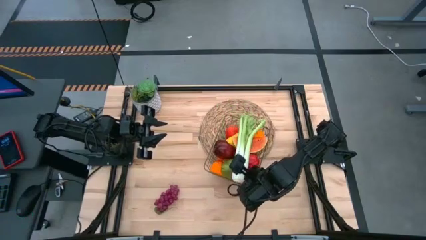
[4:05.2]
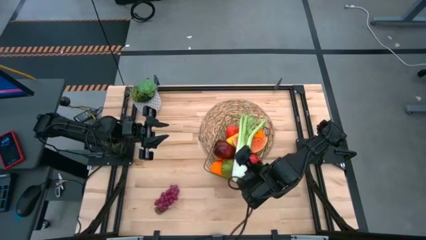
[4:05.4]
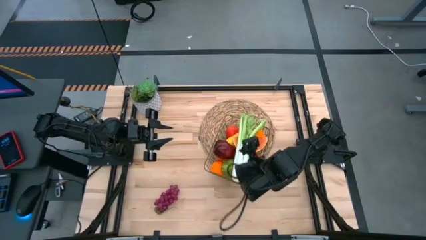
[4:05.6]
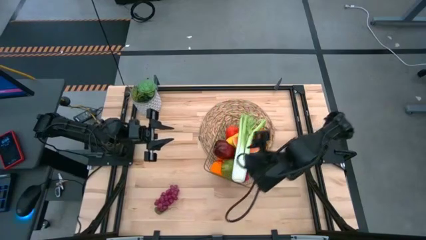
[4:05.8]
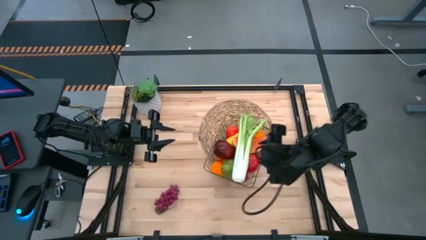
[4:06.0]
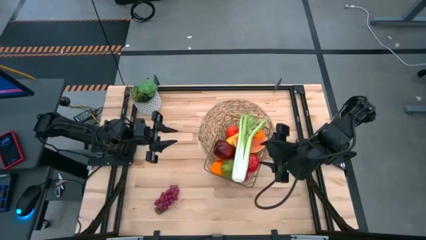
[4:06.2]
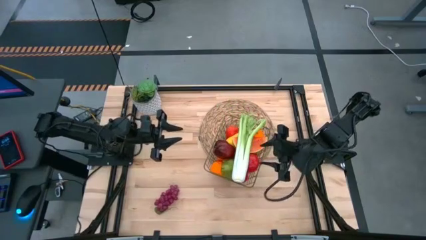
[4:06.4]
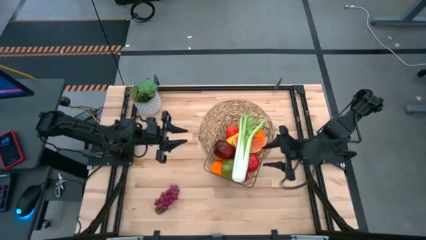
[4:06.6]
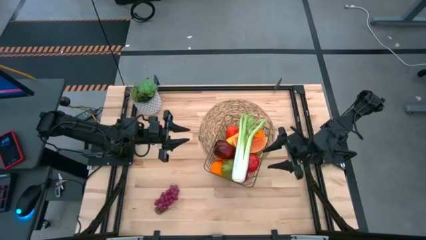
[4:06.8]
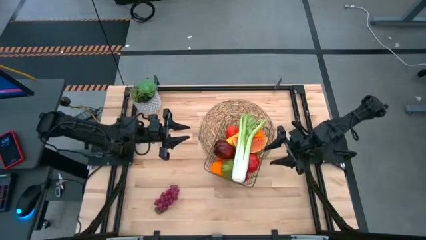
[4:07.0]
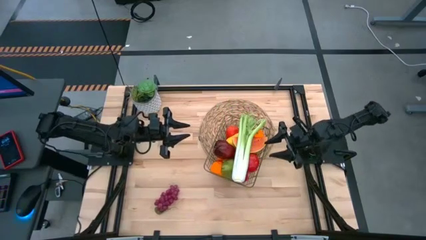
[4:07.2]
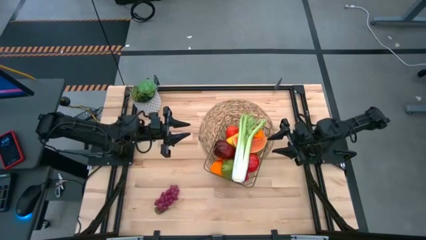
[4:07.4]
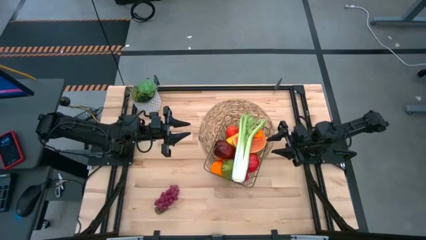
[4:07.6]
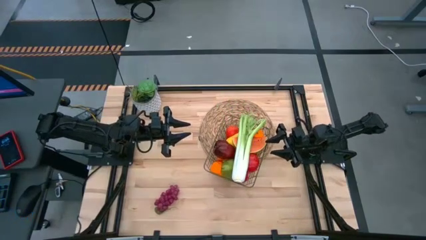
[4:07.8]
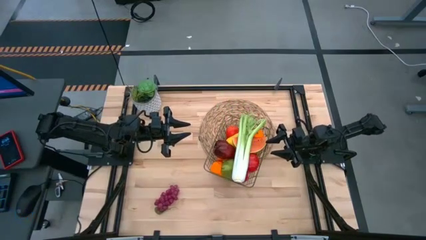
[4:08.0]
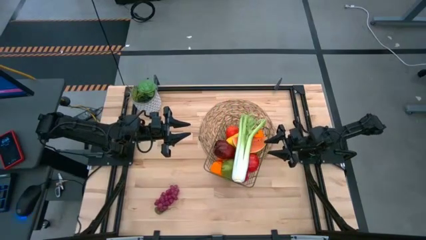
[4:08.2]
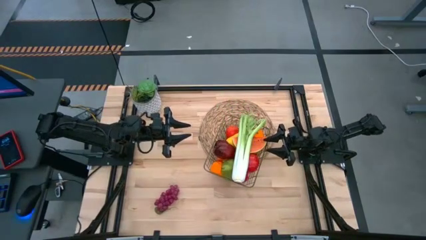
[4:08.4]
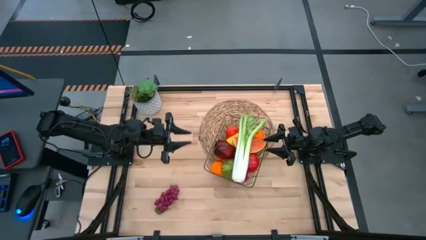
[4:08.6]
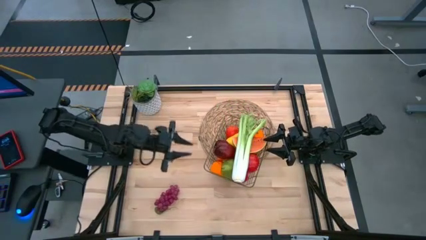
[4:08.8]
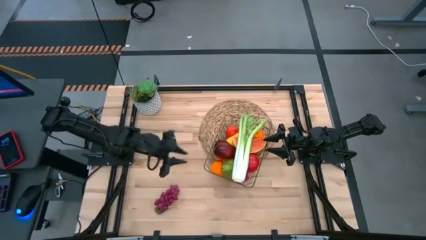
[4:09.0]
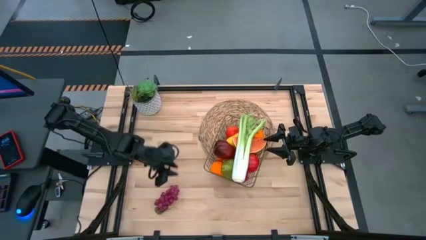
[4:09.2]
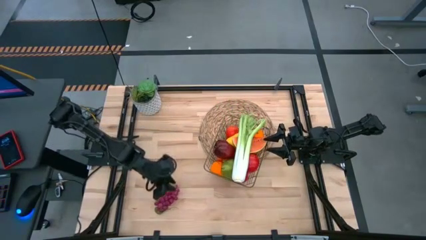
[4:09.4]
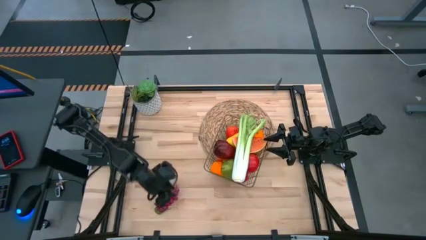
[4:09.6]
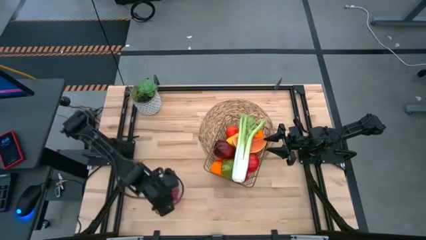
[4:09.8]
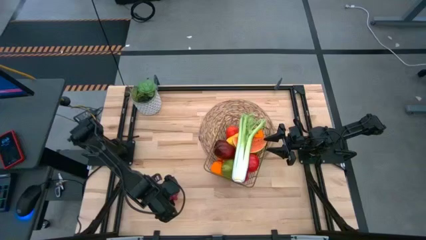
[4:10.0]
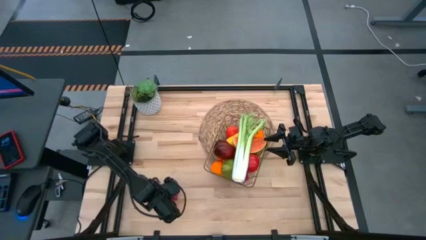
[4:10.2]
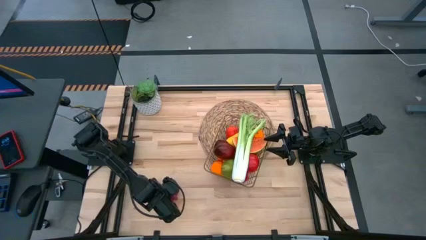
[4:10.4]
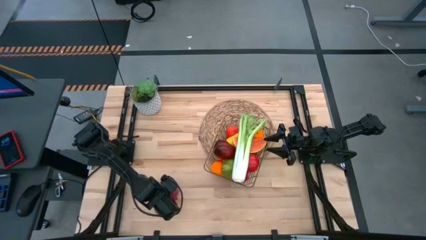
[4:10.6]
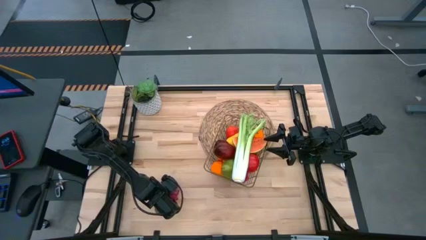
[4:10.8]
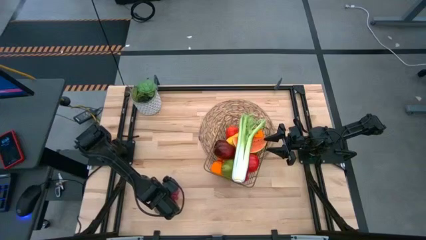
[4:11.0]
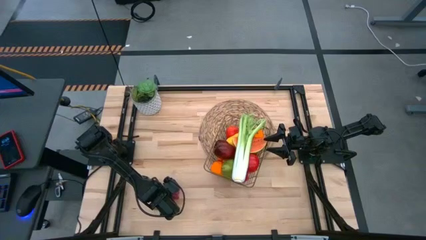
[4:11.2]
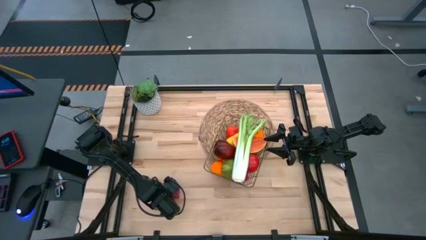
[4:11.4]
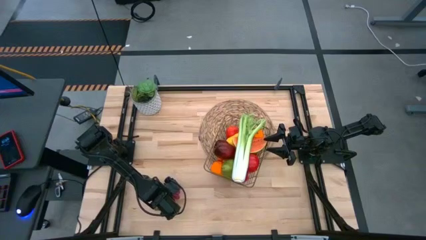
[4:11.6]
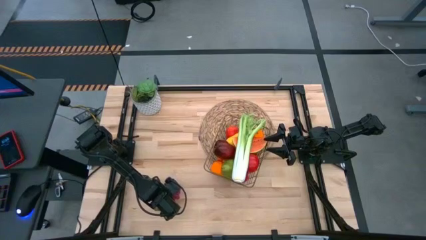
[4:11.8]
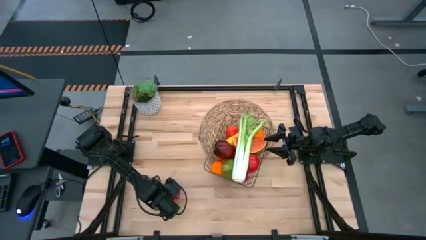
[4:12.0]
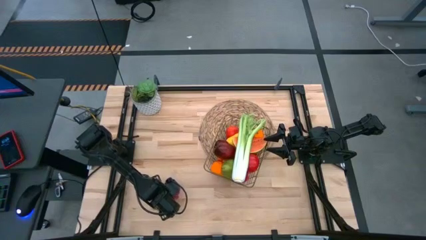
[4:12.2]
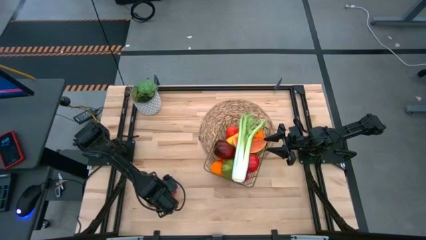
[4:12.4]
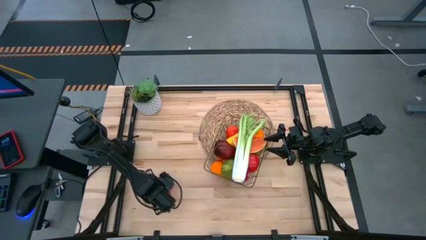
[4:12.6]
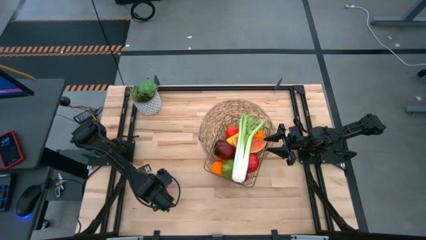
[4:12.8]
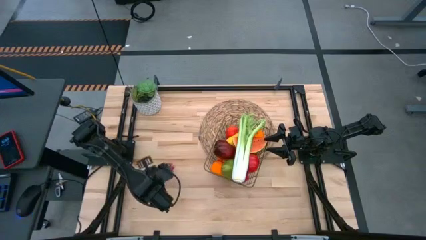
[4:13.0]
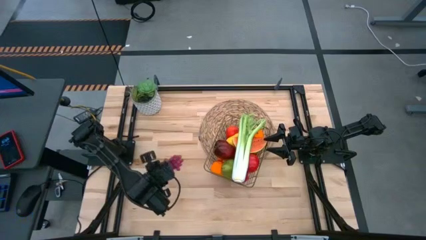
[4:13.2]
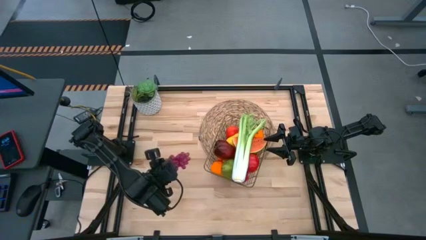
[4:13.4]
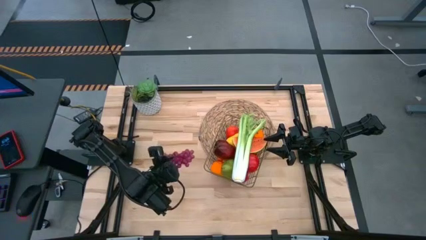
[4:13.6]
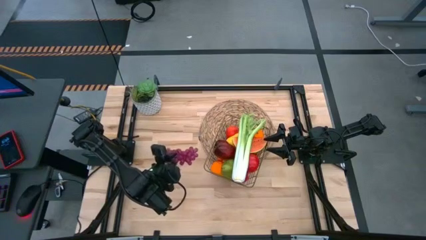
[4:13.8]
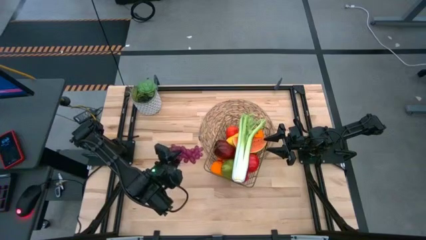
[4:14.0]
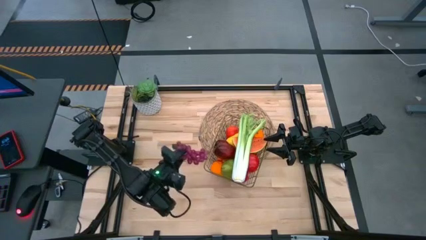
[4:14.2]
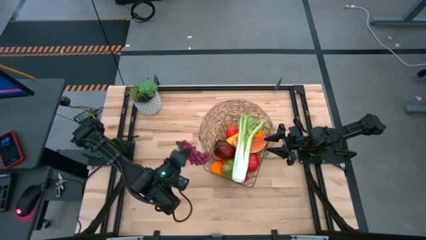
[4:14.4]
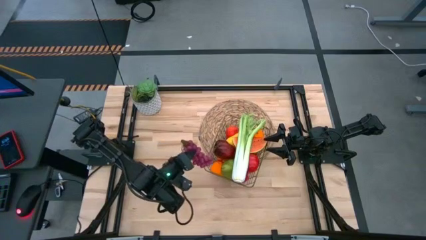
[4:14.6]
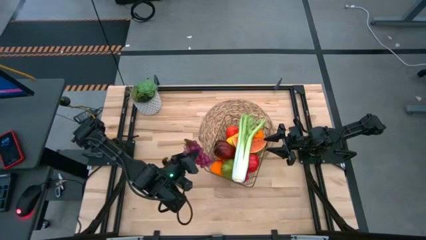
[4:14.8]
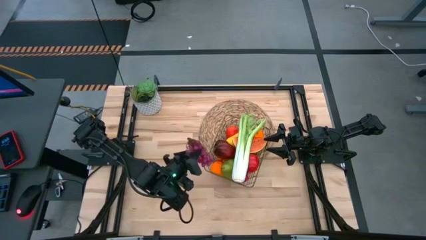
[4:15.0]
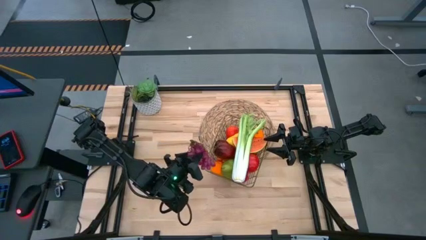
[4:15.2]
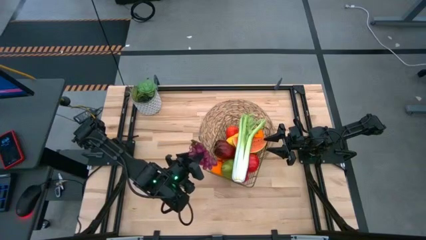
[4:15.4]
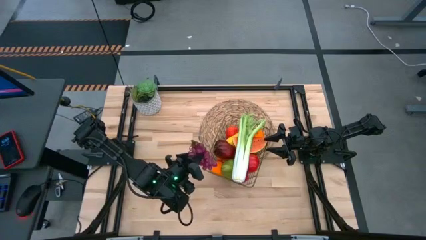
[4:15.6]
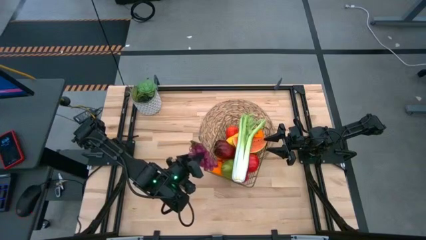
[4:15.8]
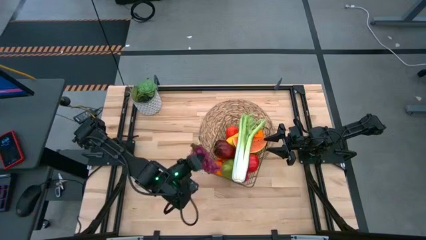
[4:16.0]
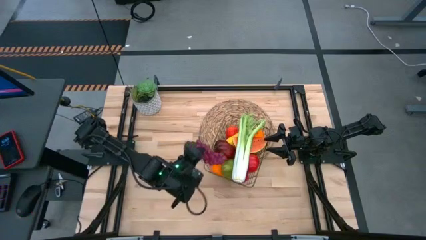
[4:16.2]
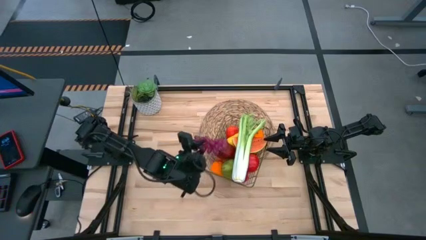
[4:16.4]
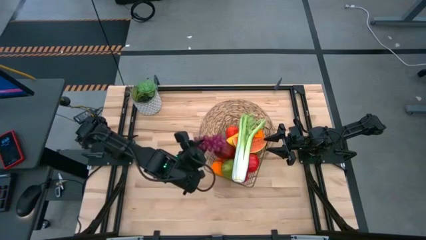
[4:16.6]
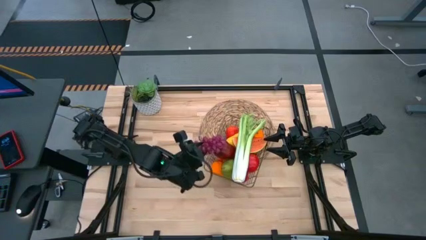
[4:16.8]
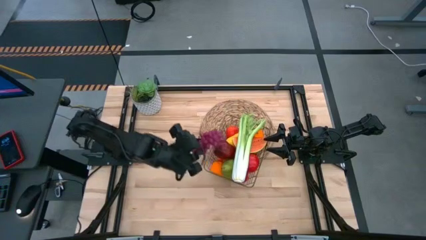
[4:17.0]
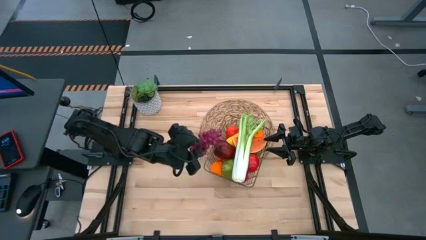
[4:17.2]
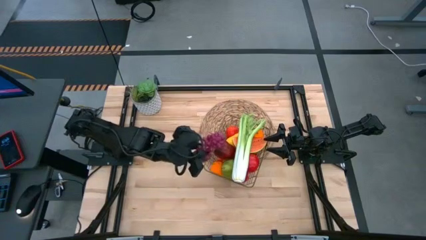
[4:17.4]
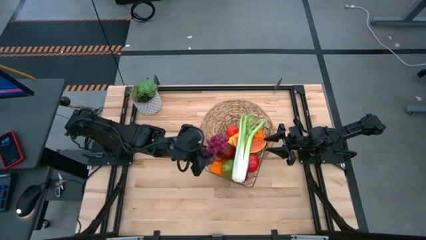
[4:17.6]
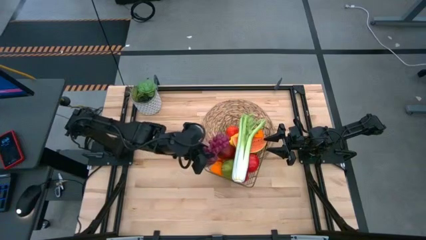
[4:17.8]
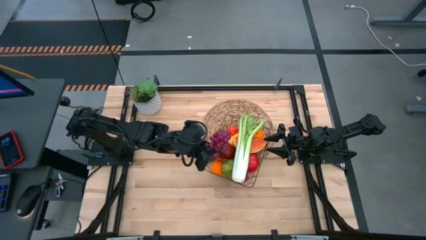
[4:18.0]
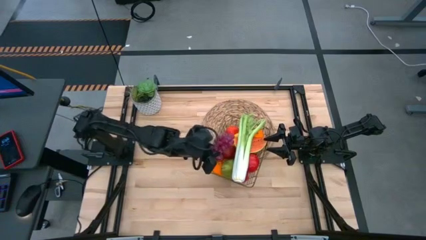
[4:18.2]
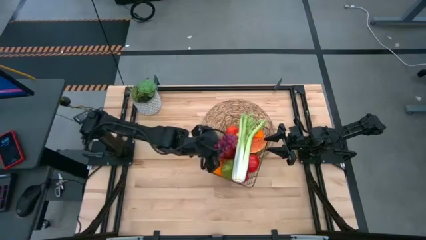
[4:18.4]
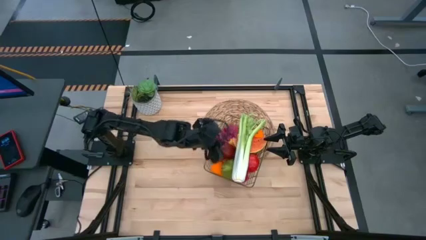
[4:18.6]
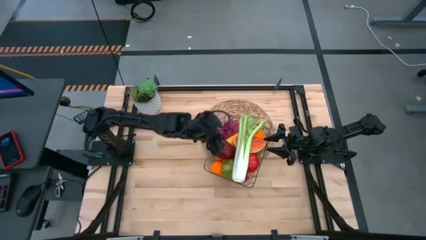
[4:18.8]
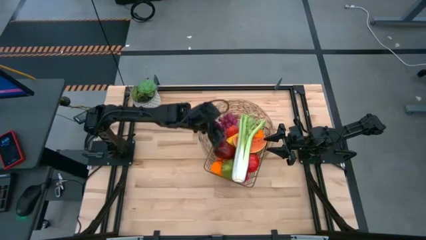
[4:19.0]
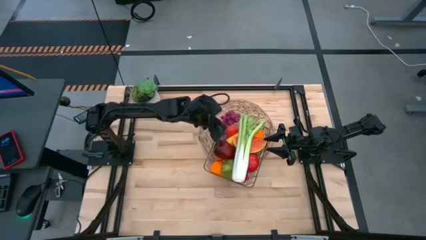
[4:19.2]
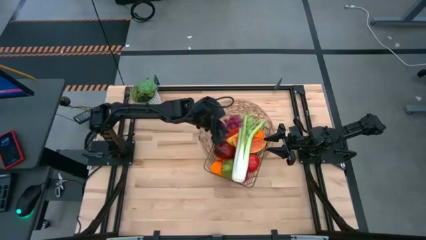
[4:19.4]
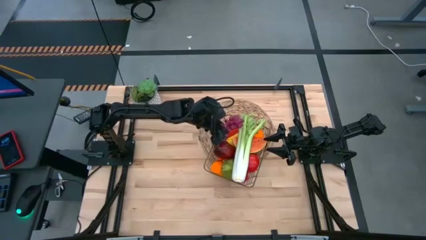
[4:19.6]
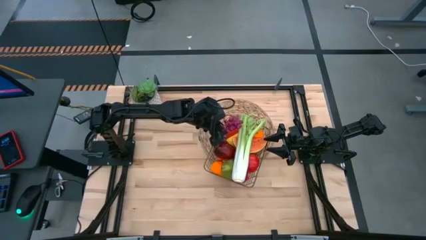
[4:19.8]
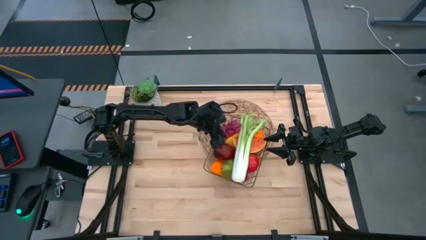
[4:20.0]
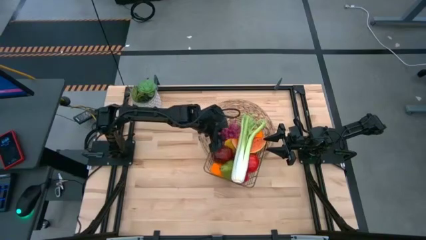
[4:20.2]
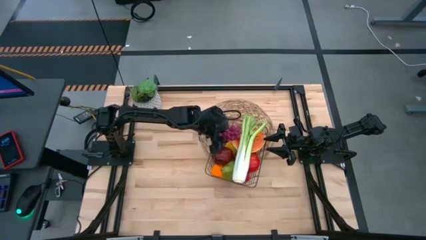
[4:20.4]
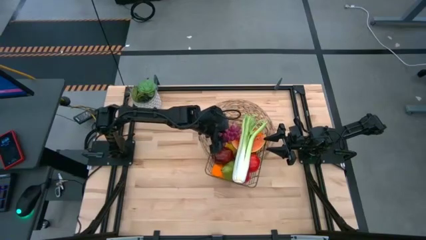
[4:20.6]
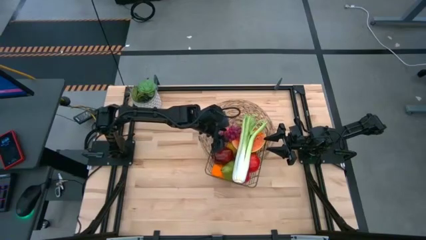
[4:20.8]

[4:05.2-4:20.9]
Task: Build produce basket
Put the grapes into the wire basket
